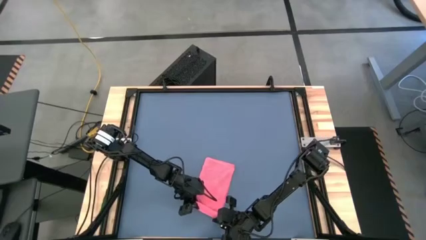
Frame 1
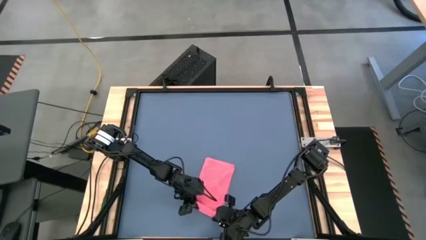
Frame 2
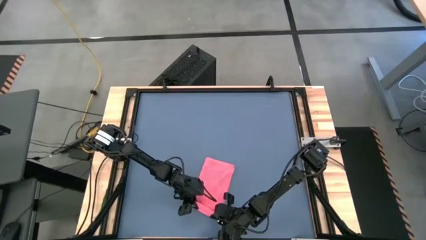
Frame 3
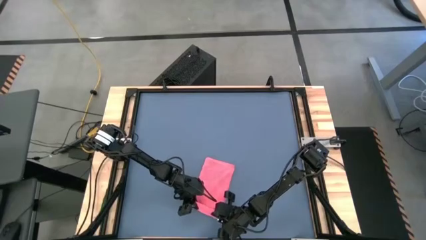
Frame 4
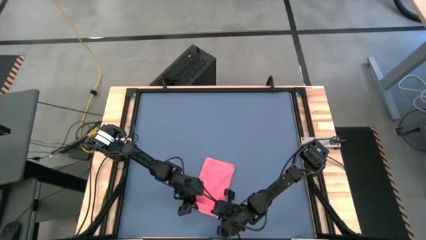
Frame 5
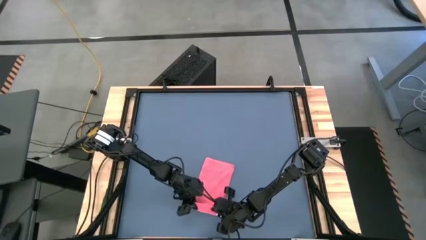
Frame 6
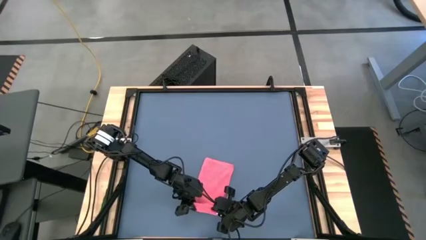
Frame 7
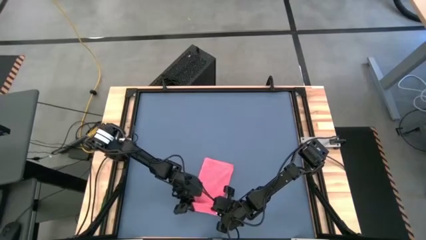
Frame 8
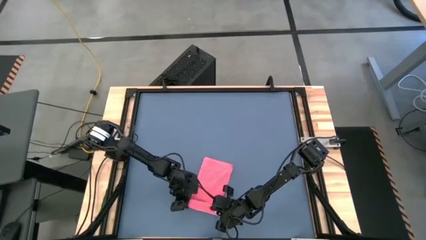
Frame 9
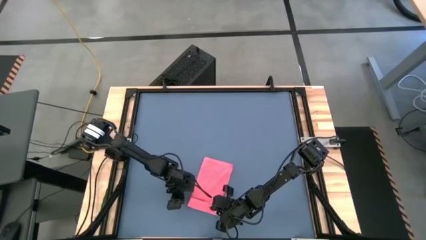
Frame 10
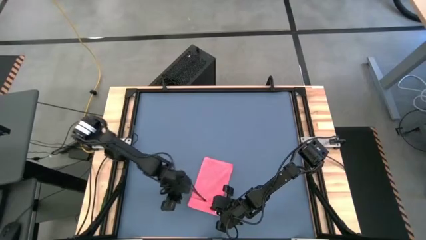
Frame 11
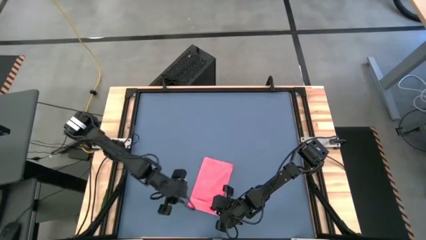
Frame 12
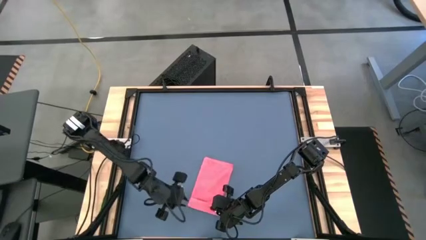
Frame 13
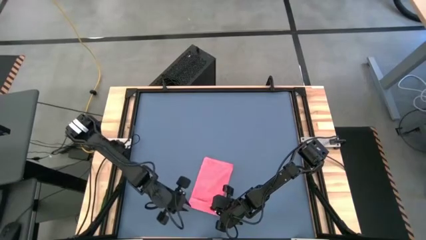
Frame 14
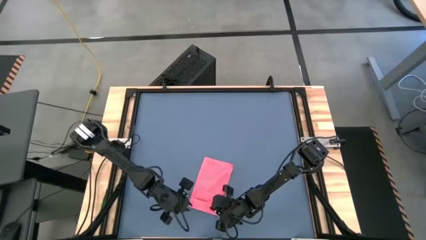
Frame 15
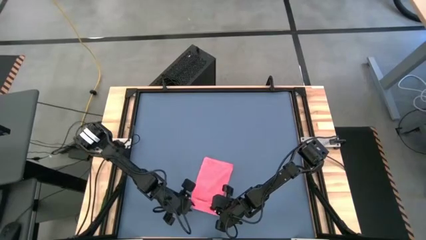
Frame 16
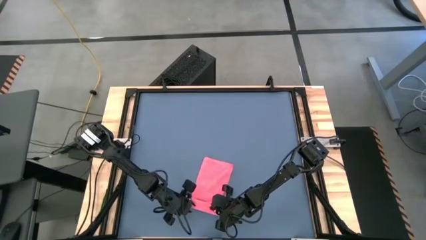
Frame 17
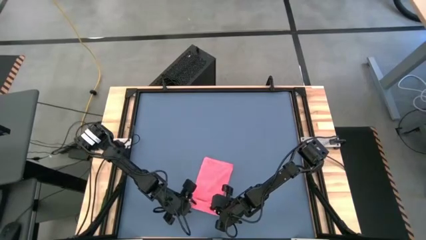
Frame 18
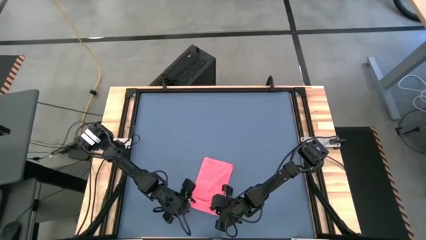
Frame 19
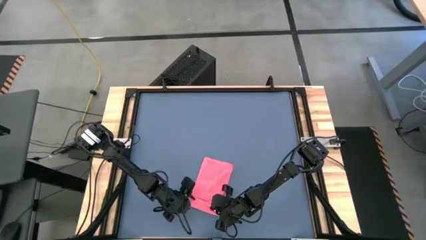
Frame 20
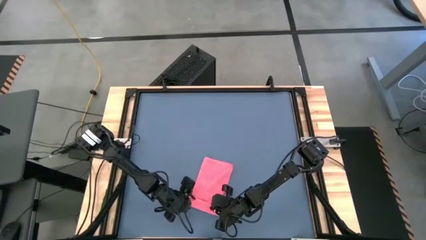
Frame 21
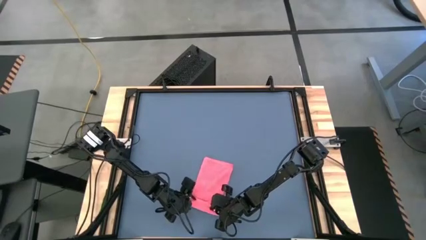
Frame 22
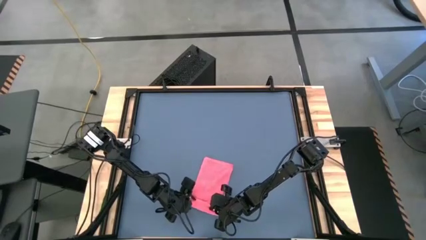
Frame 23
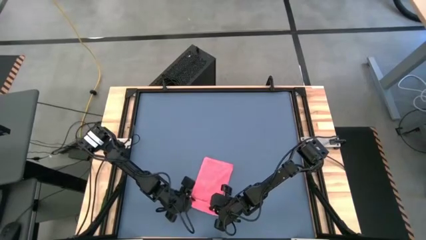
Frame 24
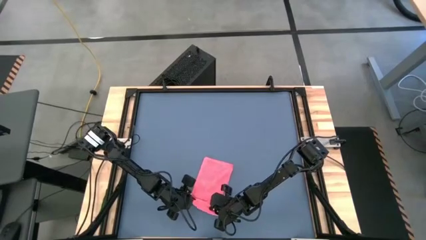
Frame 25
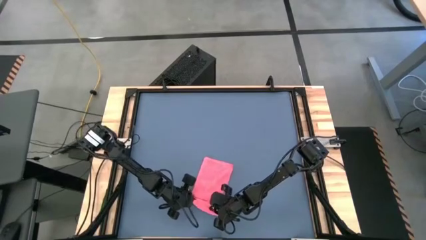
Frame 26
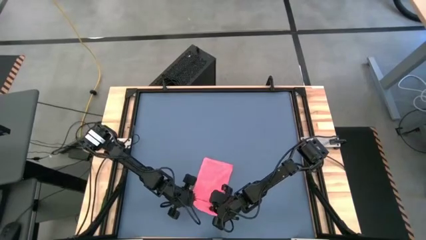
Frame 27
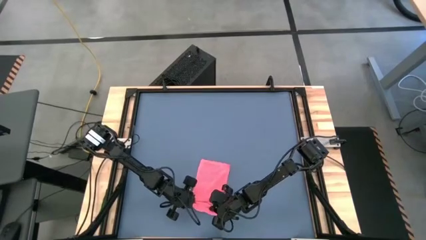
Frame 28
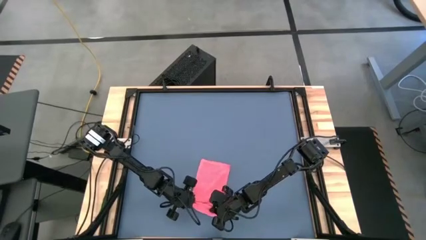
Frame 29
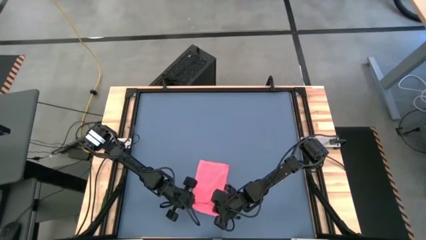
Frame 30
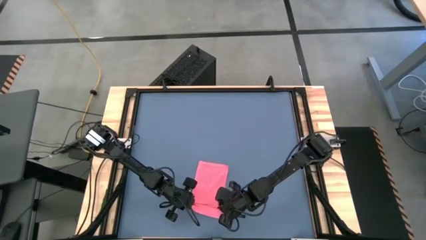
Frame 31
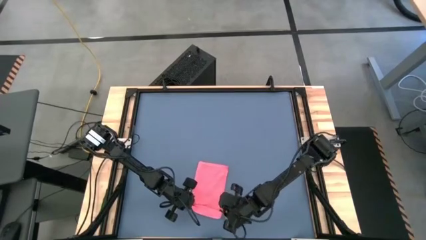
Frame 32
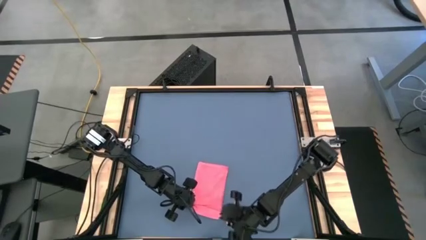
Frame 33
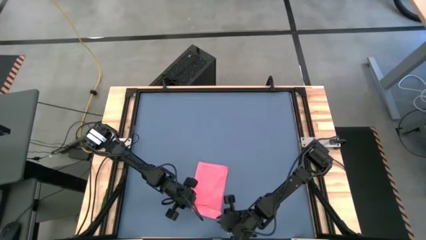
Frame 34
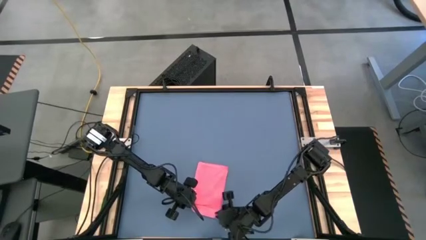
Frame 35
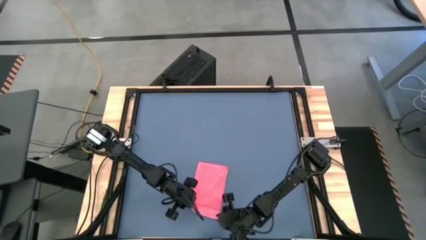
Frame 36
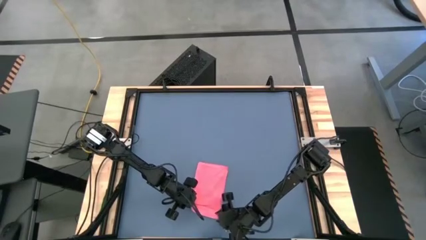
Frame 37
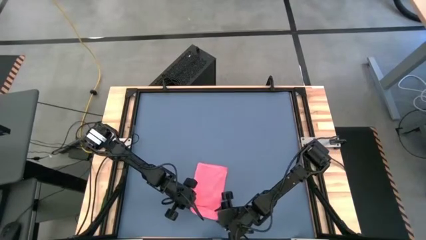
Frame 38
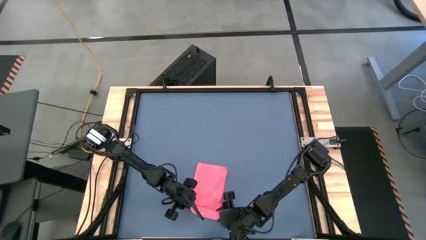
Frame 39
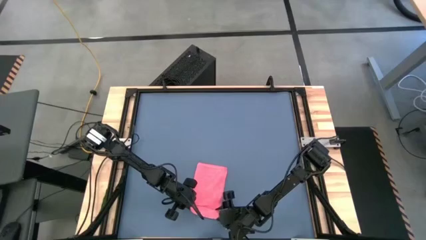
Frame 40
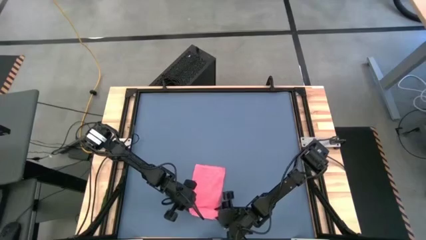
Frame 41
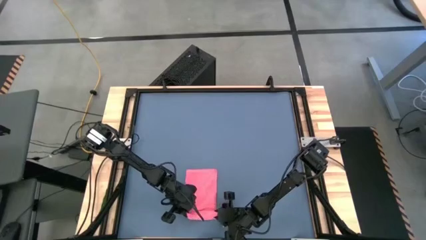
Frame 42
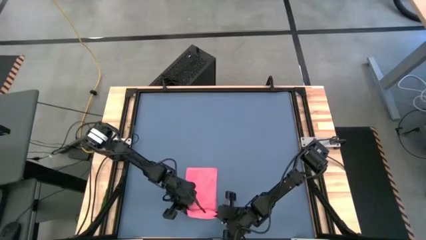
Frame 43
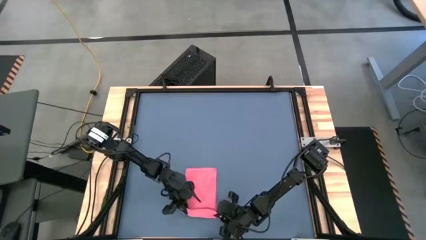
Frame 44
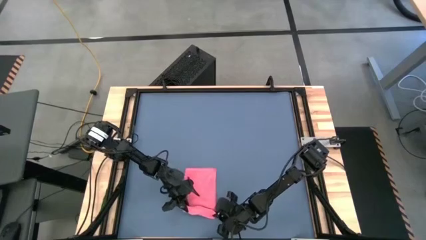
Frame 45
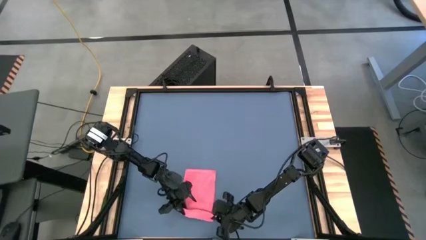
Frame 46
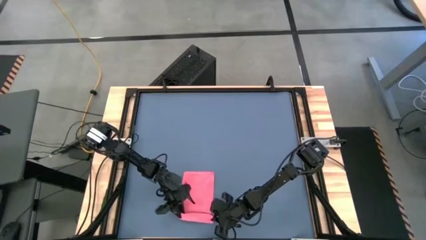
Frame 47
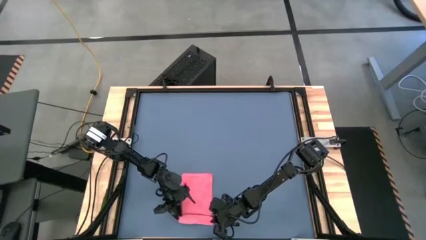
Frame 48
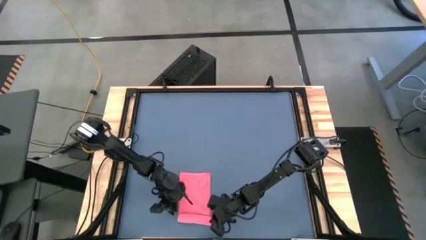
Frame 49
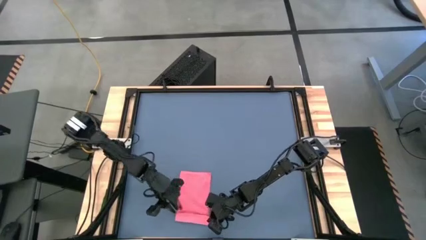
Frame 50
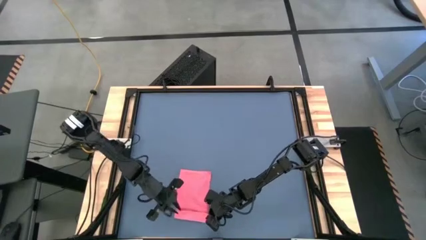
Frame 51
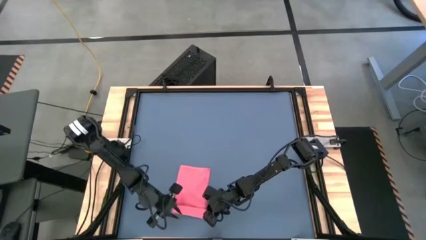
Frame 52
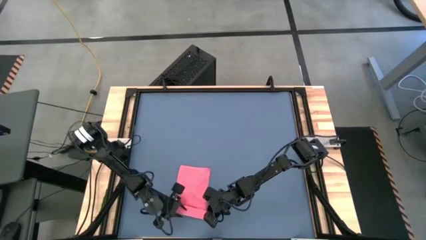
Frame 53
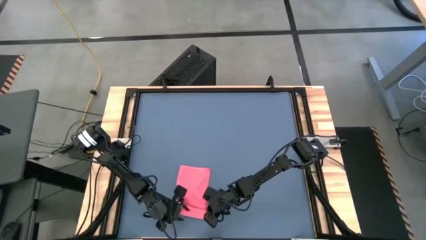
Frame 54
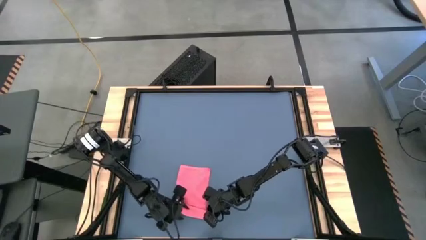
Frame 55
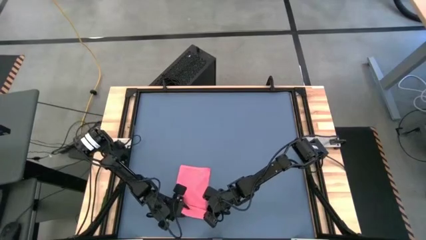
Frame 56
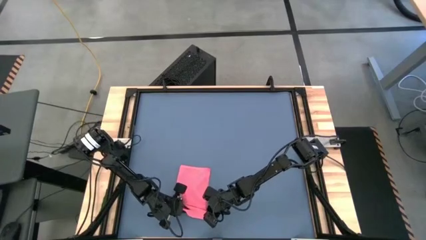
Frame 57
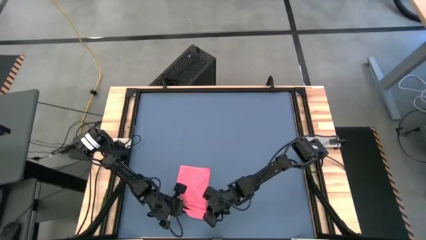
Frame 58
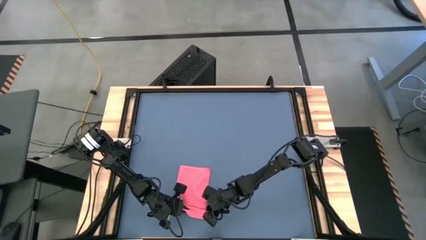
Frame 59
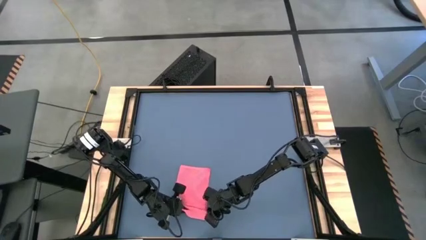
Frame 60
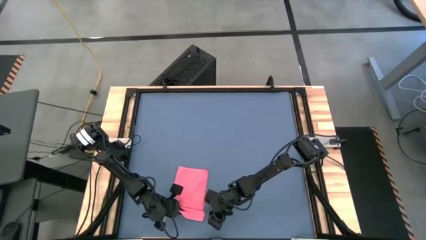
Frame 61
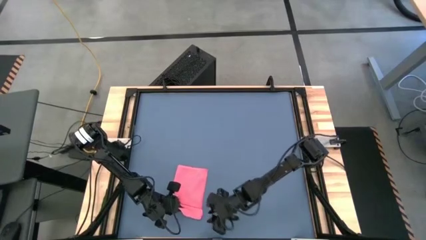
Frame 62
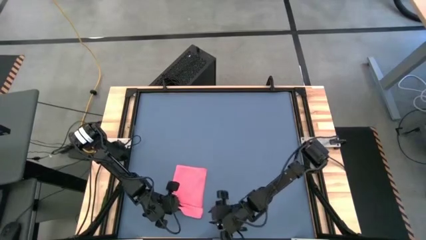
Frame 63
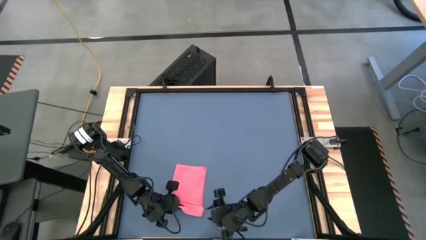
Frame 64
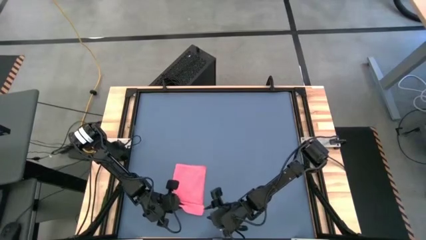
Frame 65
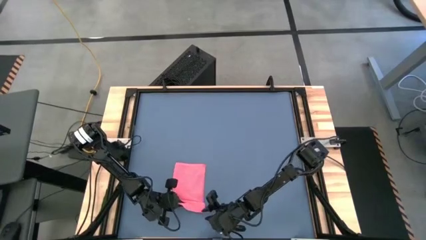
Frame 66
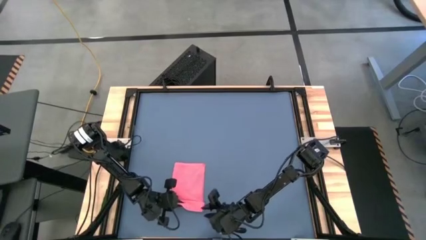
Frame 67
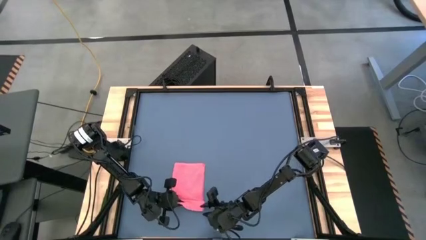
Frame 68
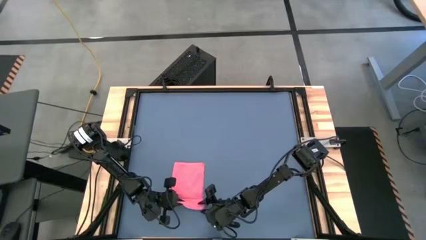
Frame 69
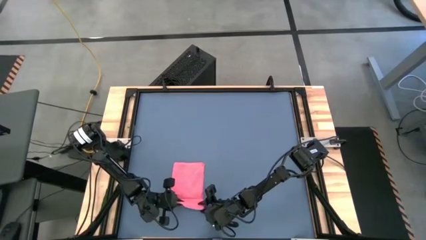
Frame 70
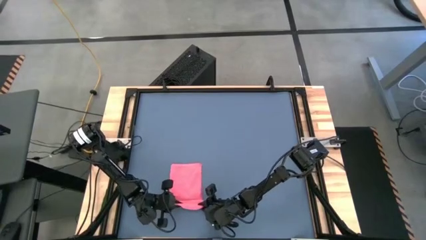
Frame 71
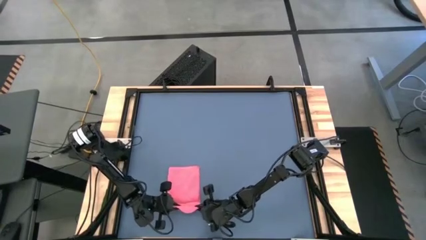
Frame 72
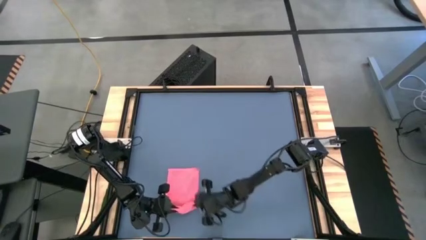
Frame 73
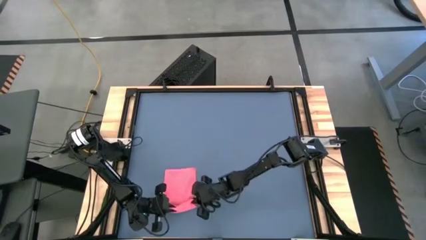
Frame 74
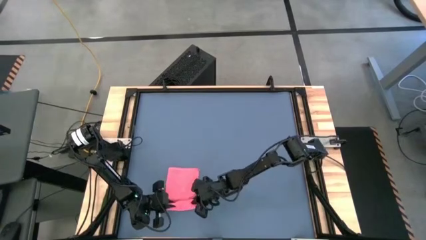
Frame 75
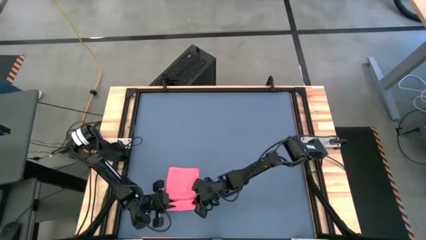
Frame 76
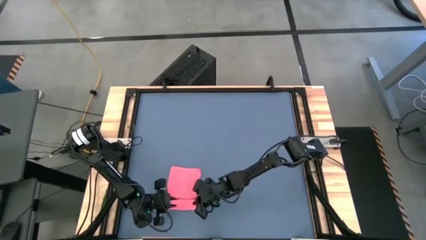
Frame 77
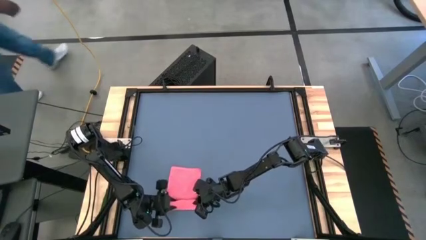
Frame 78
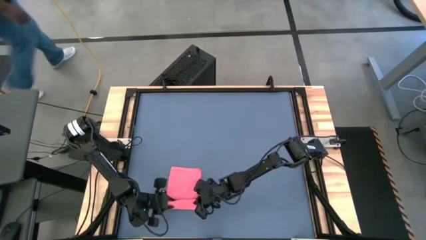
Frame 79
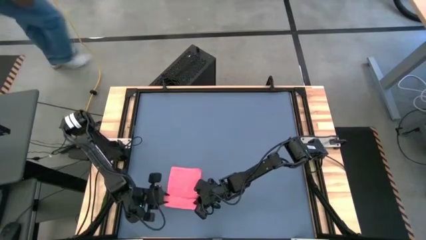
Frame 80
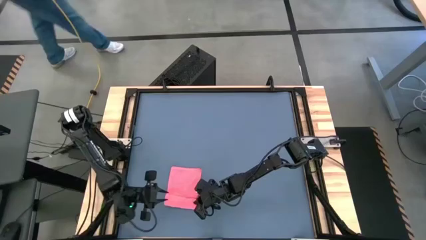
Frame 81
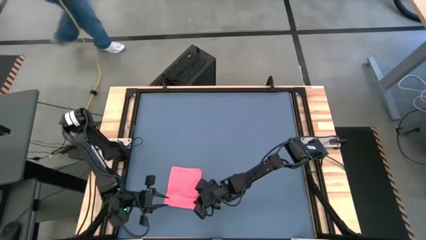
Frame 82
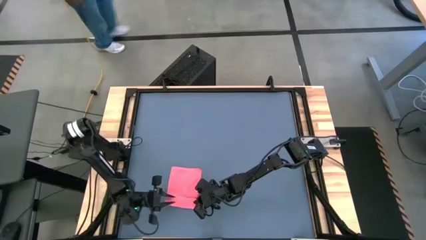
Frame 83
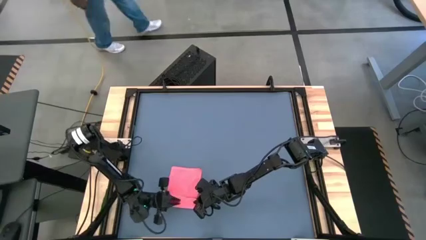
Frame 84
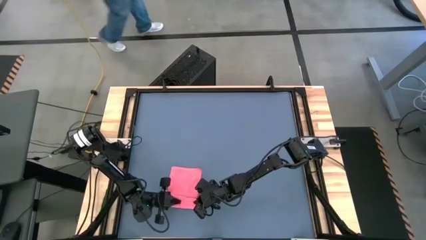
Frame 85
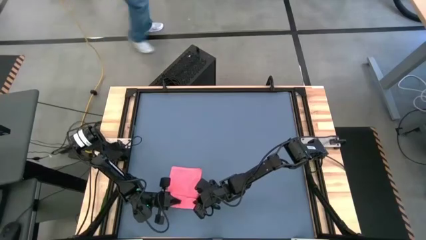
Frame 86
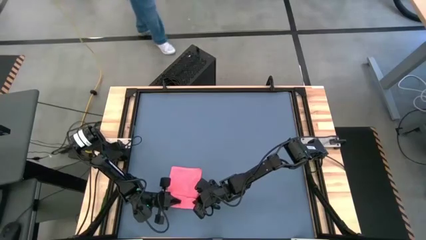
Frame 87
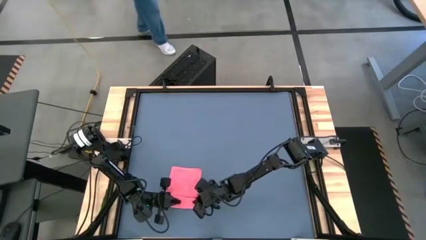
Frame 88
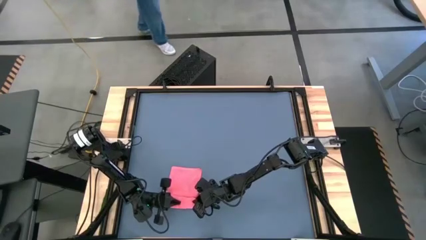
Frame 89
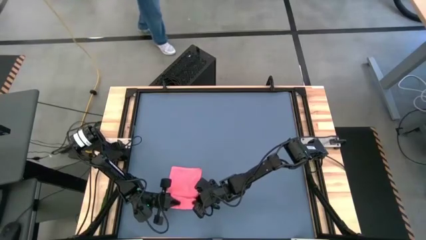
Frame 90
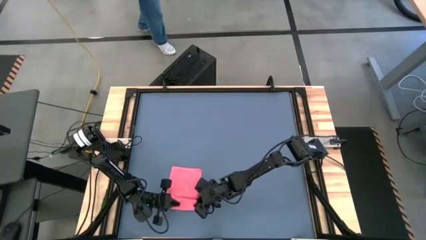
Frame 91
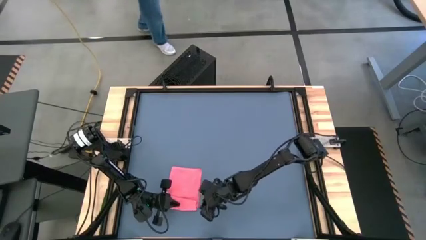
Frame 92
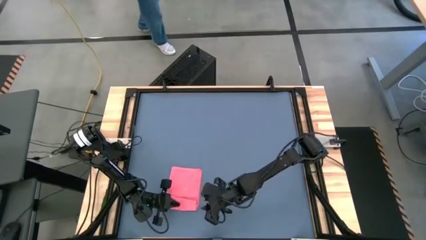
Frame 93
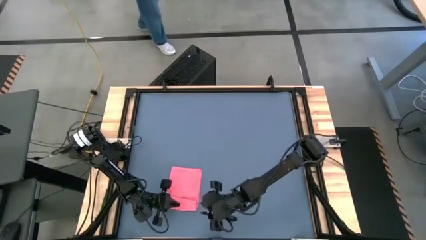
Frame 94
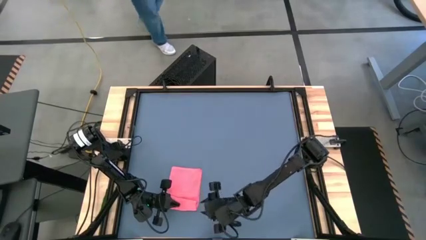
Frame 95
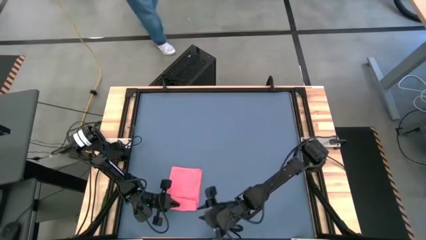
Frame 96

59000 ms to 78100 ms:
Task: Roll towel into tight, uniform cylinder
Roll the red towel
